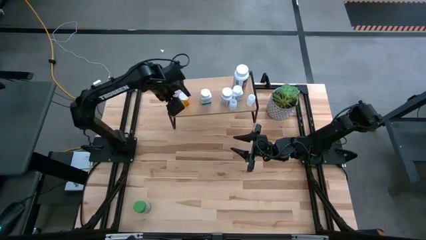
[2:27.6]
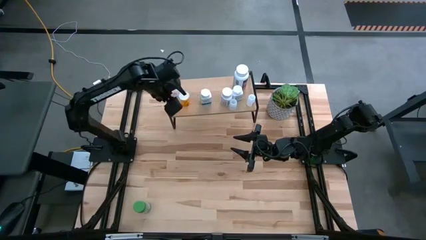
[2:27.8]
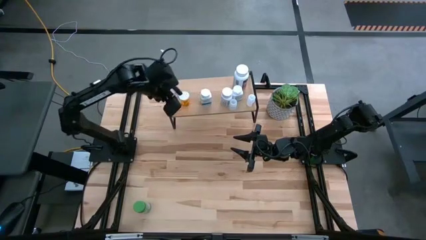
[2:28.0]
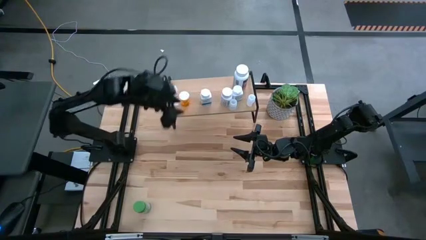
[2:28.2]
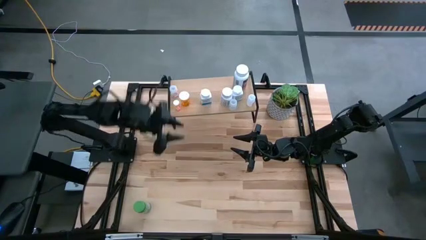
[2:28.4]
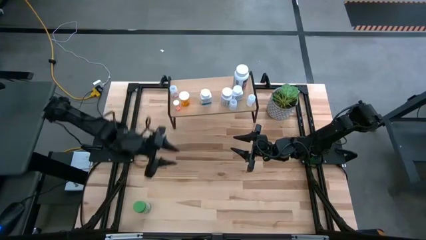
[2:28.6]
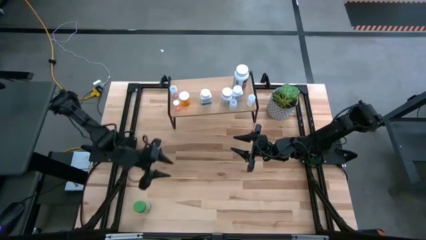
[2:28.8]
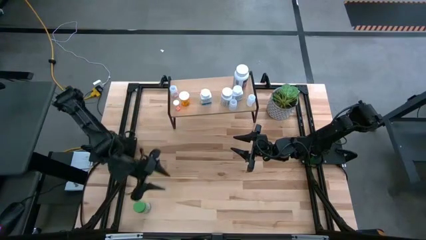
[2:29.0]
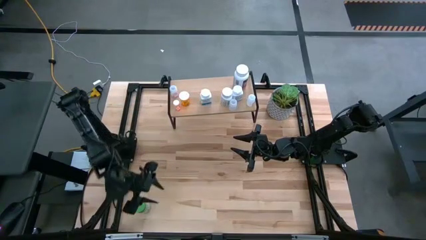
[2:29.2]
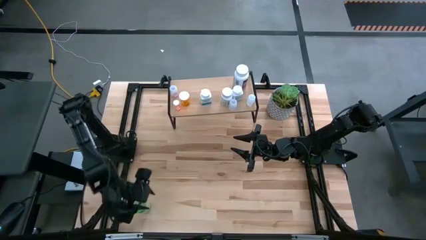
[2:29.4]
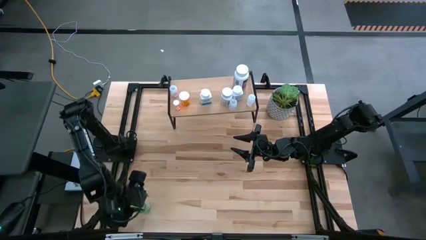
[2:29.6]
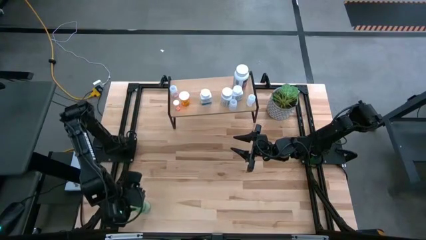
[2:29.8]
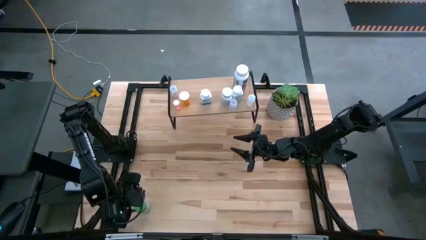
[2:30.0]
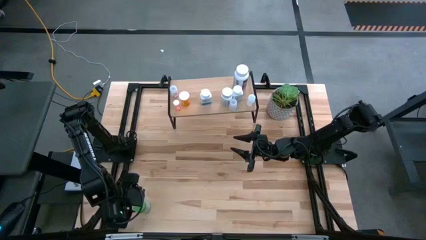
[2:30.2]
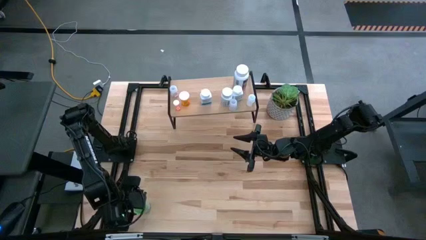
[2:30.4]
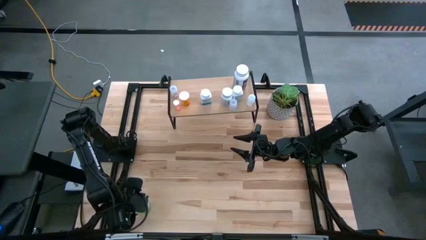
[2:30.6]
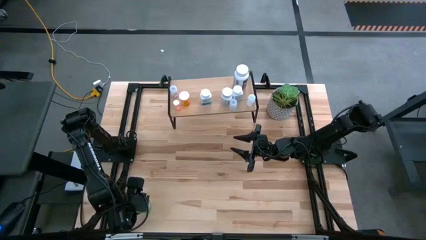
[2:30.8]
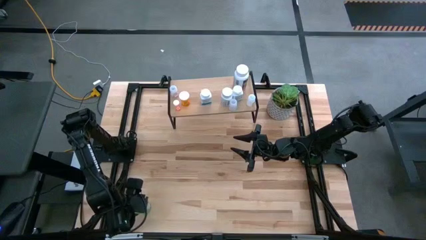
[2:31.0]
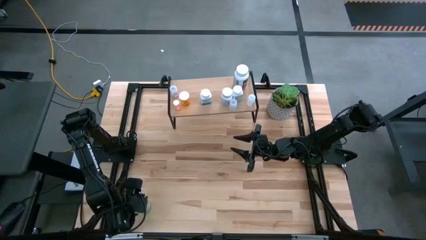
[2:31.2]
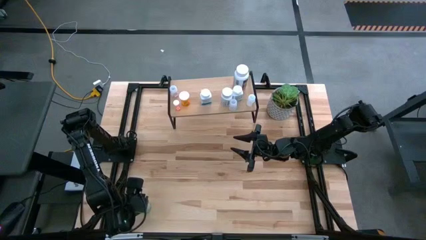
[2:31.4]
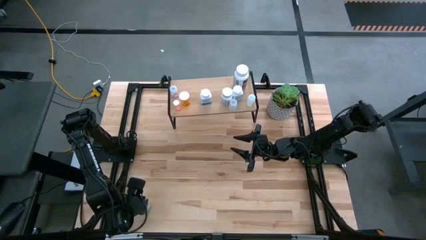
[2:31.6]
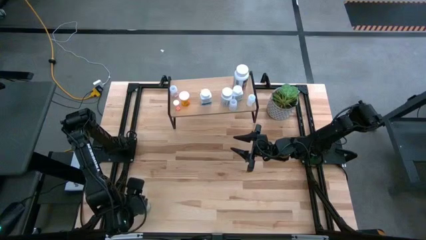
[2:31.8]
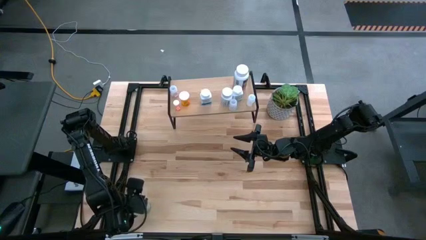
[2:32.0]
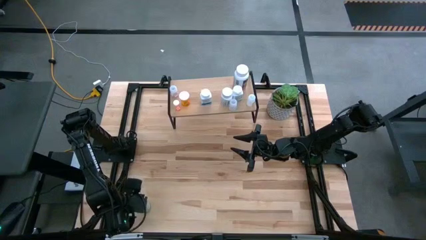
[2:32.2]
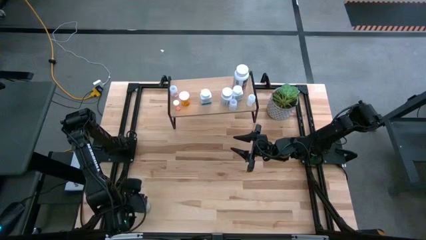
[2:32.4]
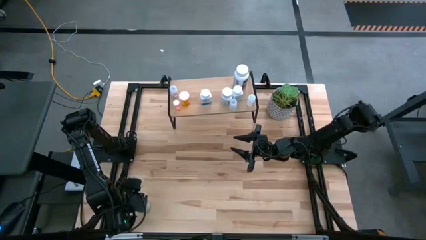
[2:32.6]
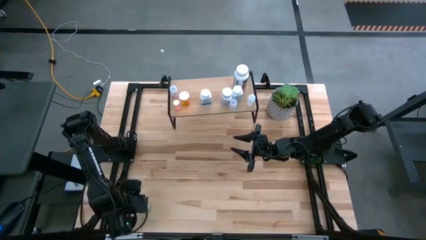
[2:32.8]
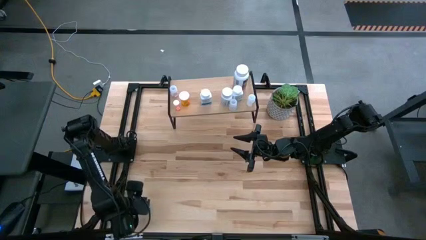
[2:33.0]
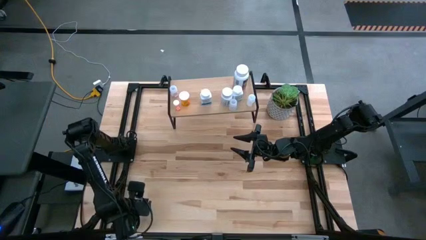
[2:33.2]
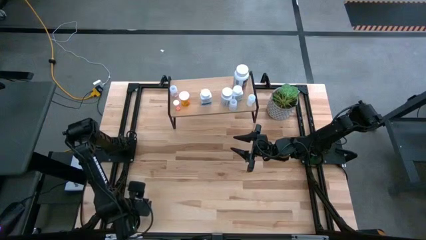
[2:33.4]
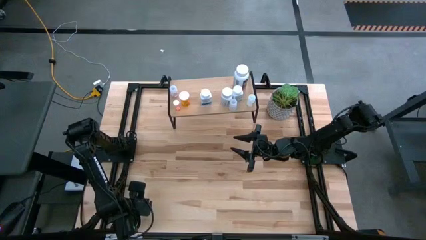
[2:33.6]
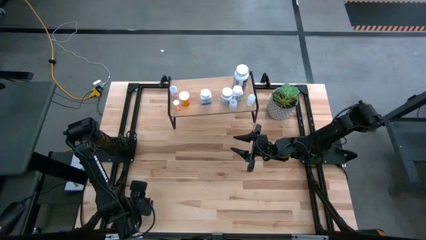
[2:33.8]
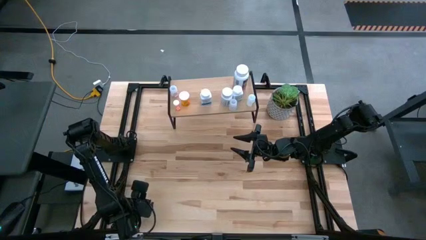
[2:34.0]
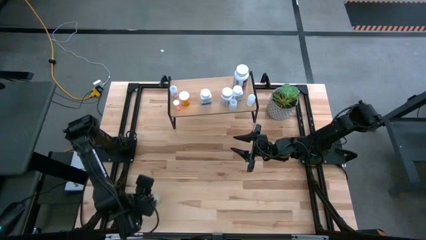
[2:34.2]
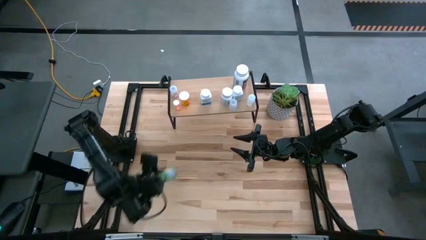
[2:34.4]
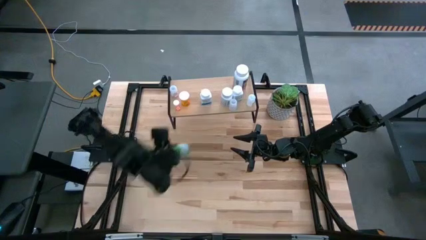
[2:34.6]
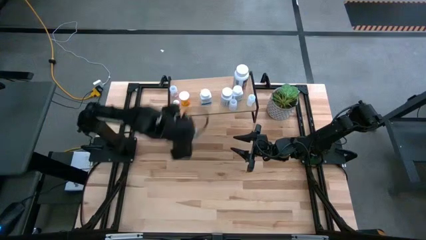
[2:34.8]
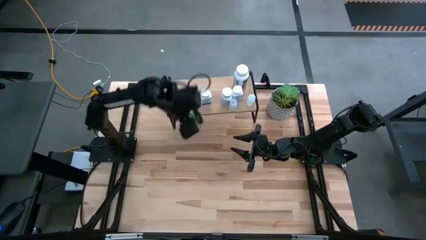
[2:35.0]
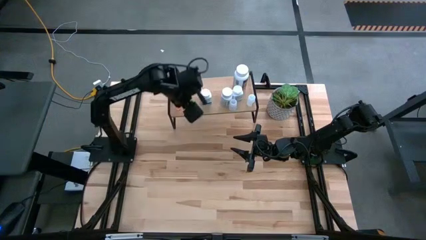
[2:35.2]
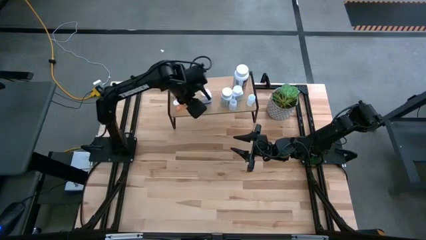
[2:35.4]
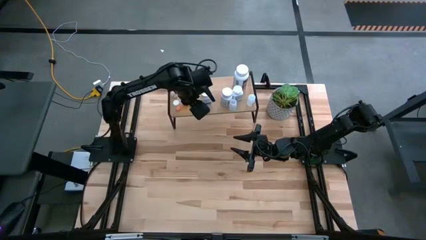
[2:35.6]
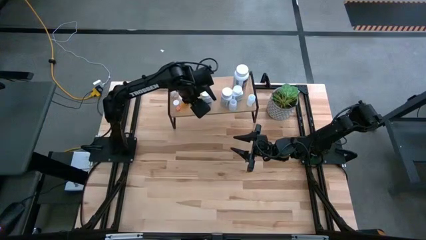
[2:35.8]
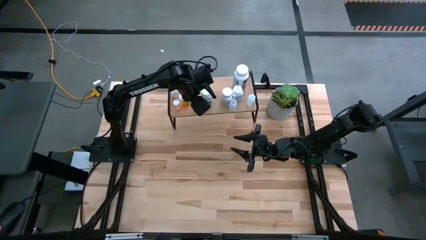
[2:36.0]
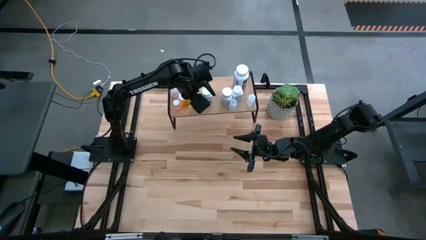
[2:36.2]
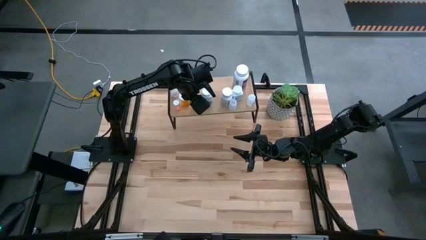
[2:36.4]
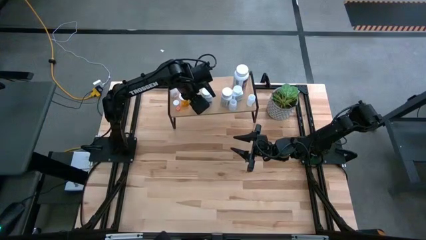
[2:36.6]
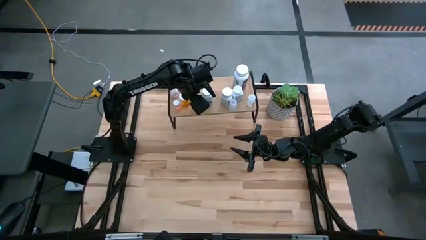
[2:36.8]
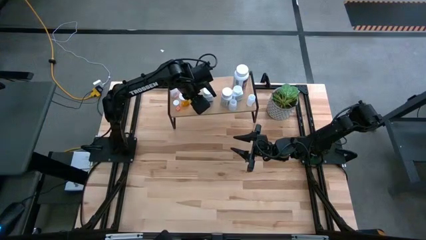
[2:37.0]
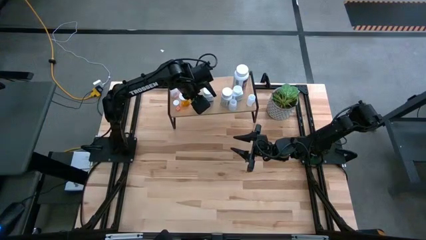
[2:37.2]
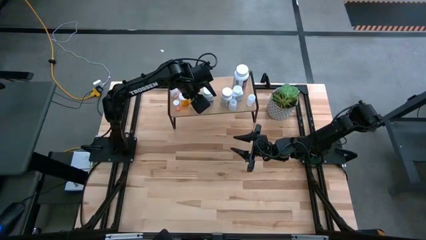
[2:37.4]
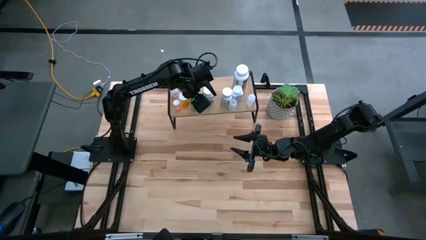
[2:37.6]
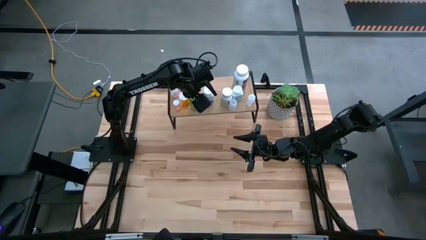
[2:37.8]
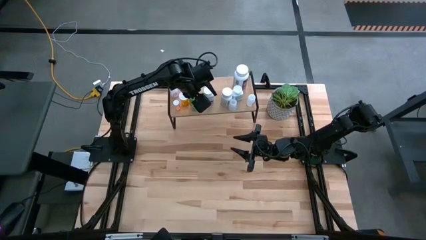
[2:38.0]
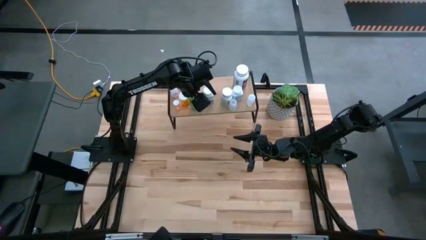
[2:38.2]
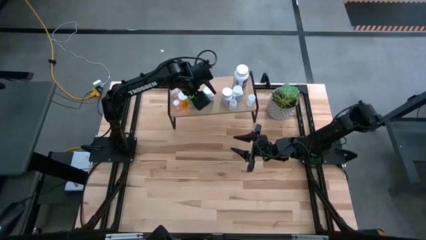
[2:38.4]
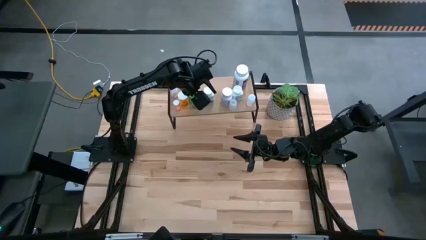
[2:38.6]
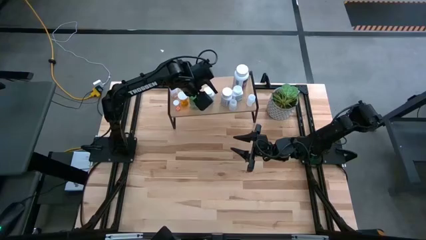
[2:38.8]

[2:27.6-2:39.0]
Task: Pick and place medicine bottles onto shelf by color
Put the green pill bottle on the shelf
